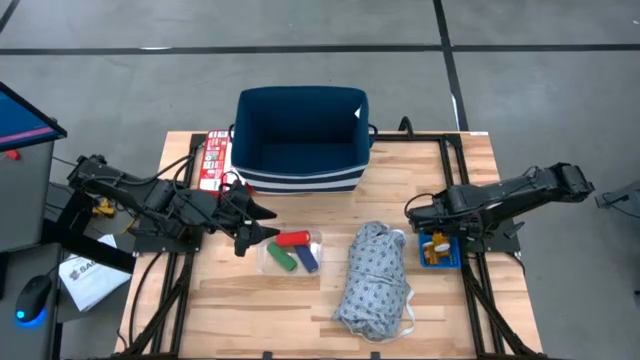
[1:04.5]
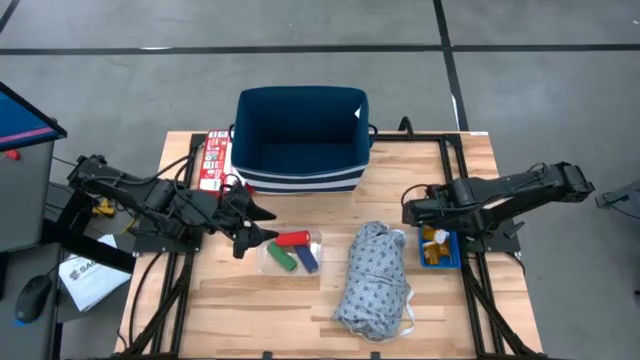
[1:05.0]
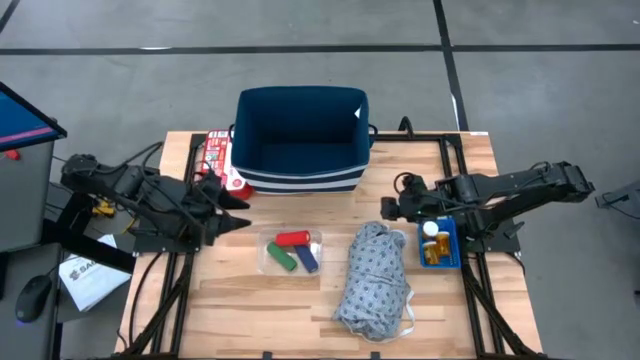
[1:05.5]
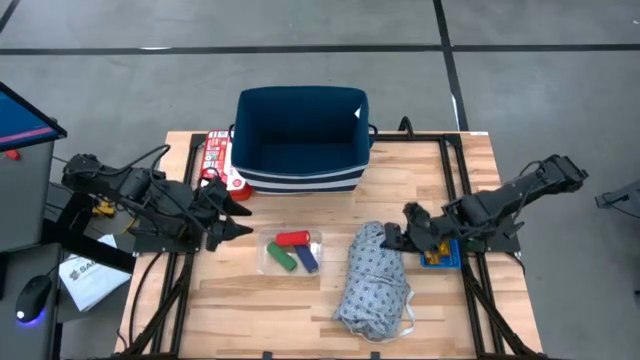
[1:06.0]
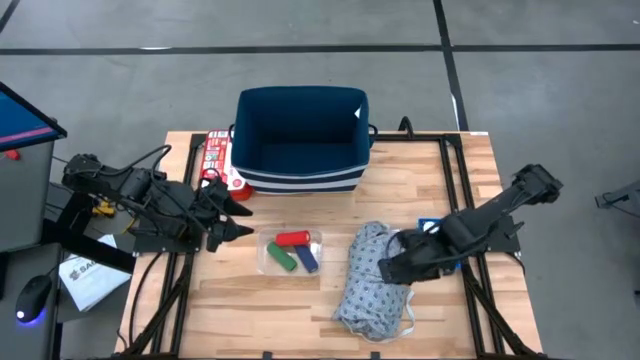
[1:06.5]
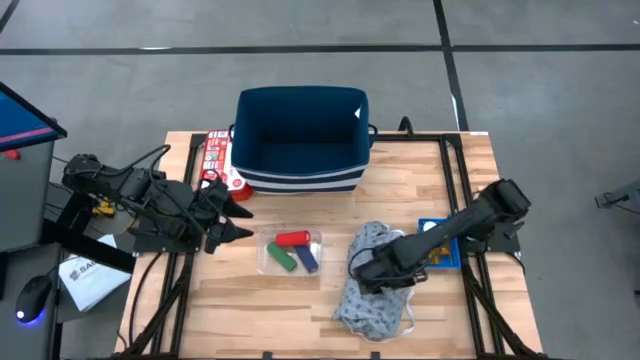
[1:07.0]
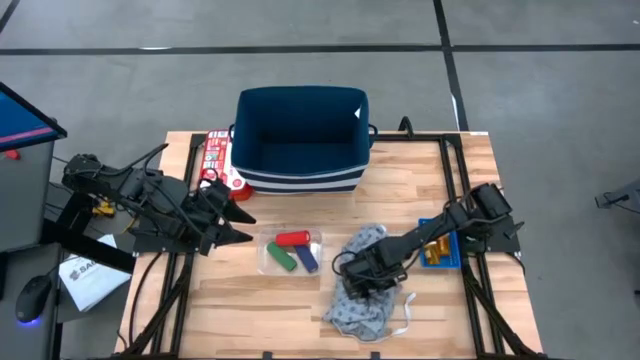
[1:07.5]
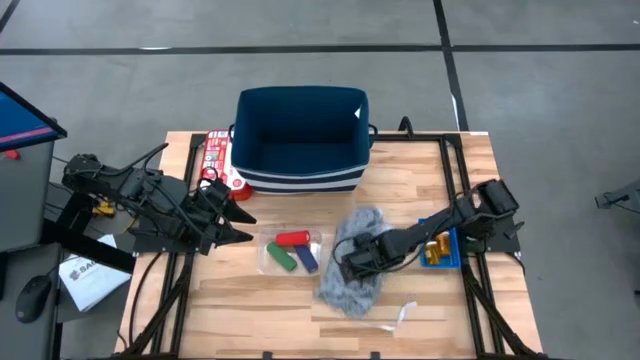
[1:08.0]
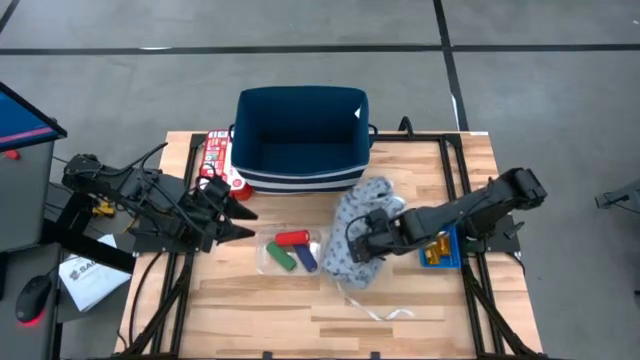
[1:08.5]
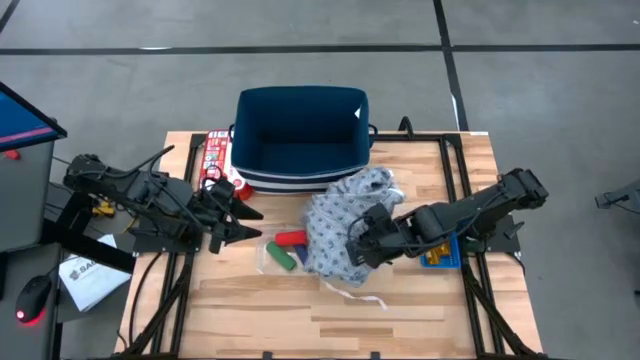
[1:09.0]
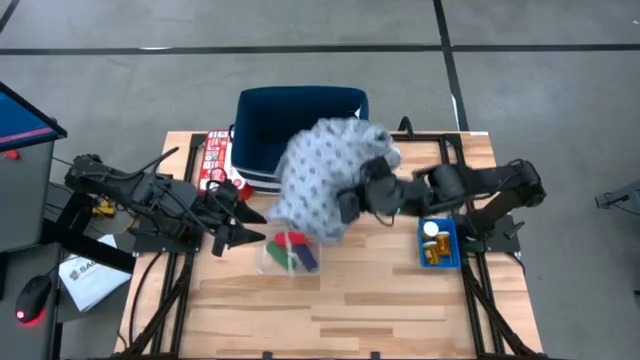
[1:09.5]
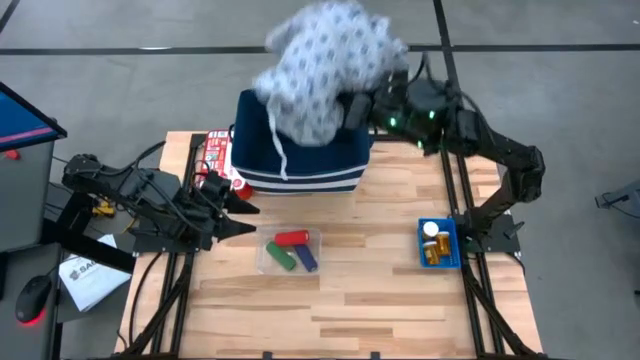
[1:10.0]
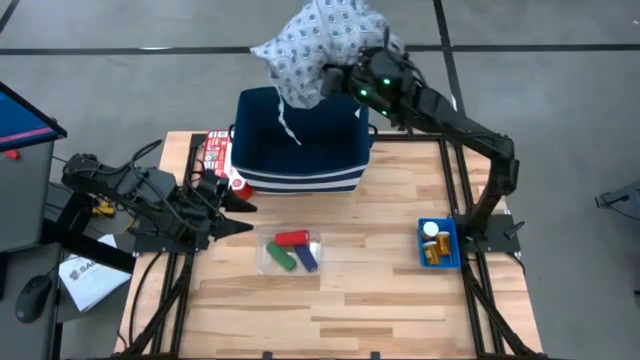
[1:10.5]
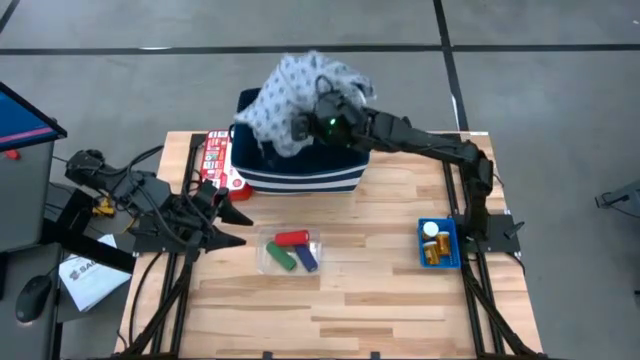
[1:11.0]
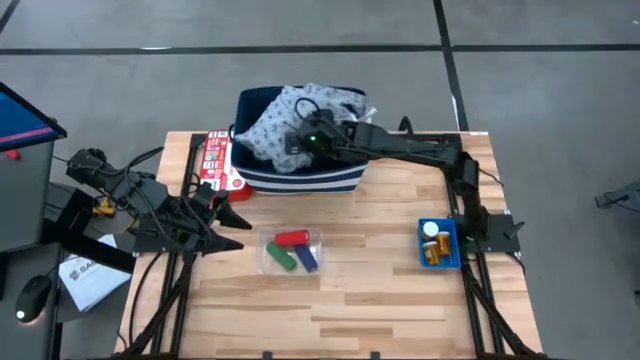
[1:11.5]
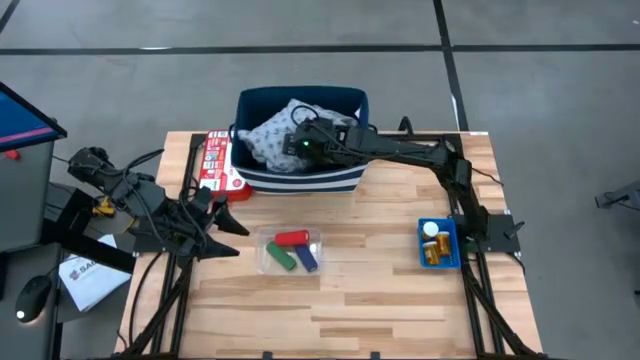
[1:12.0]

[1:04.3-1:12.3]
Task: Pick & place medical supplies in basket/bin
Put the blue patient gown into the large blue bin

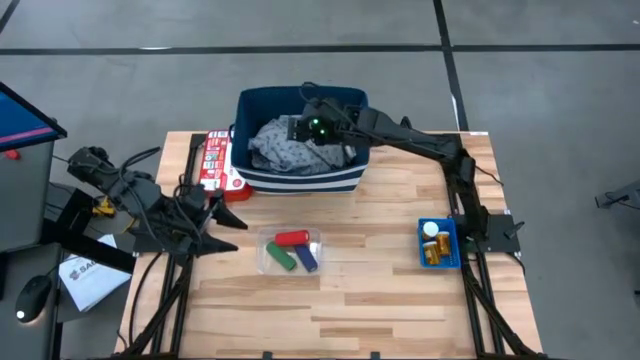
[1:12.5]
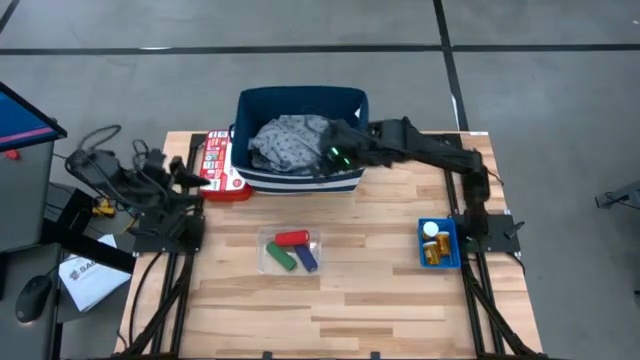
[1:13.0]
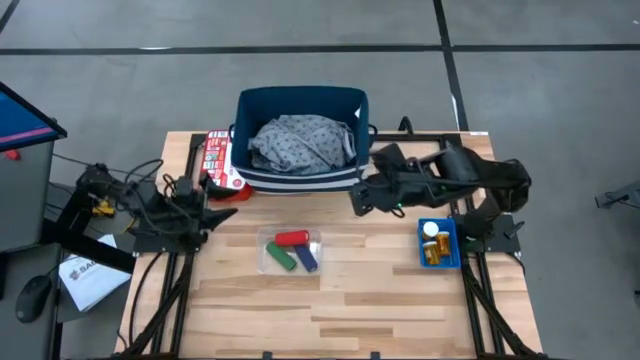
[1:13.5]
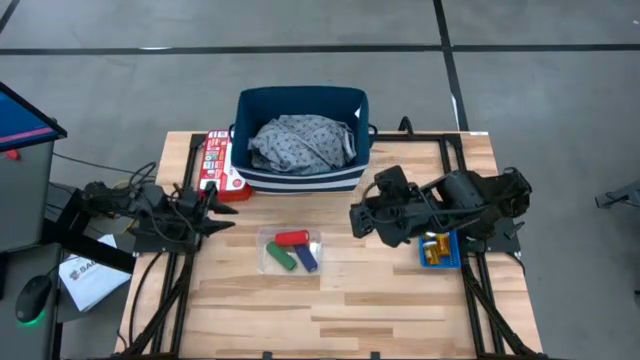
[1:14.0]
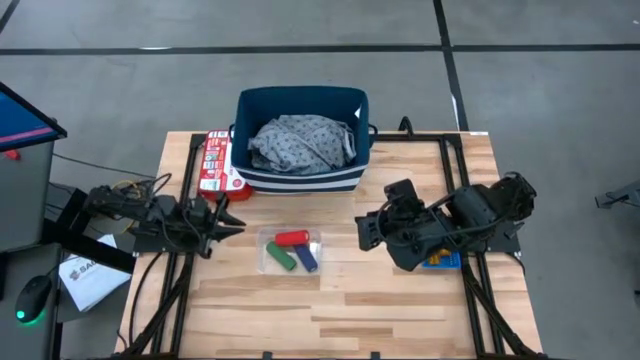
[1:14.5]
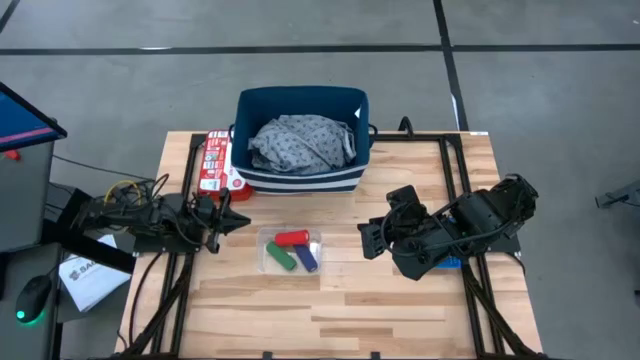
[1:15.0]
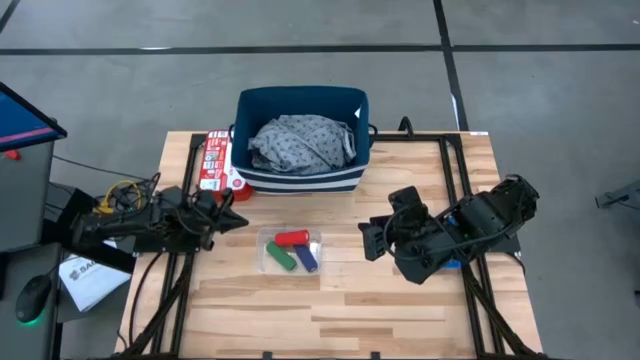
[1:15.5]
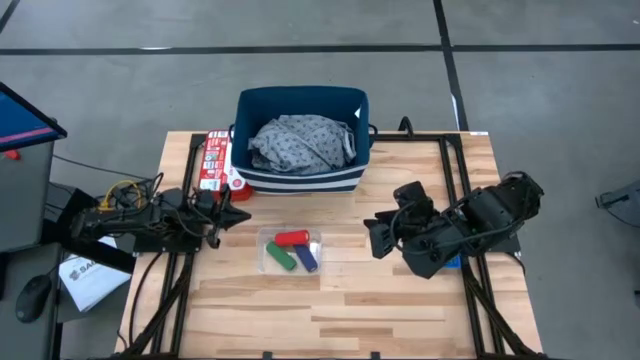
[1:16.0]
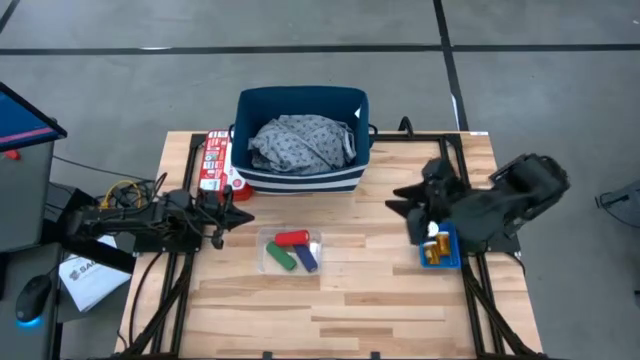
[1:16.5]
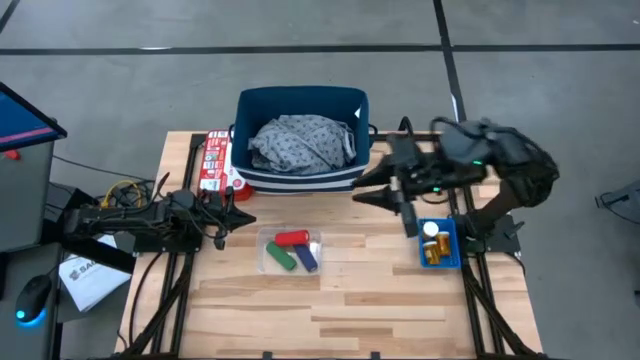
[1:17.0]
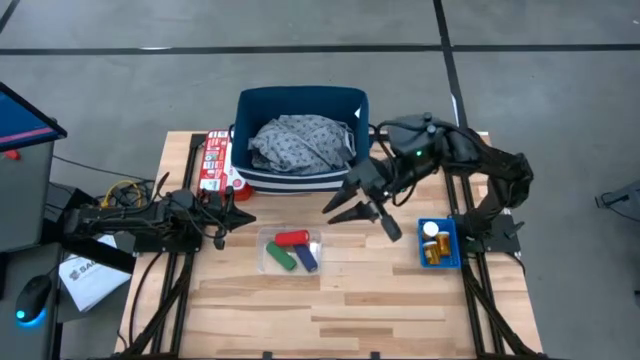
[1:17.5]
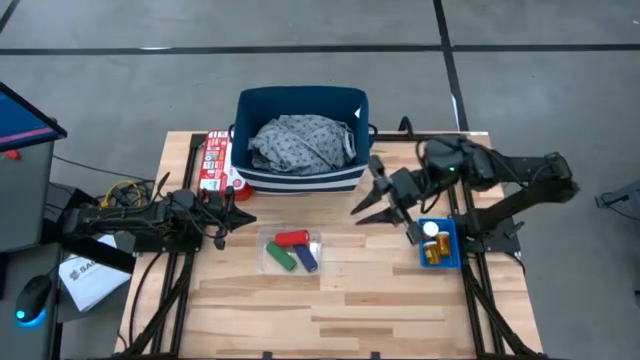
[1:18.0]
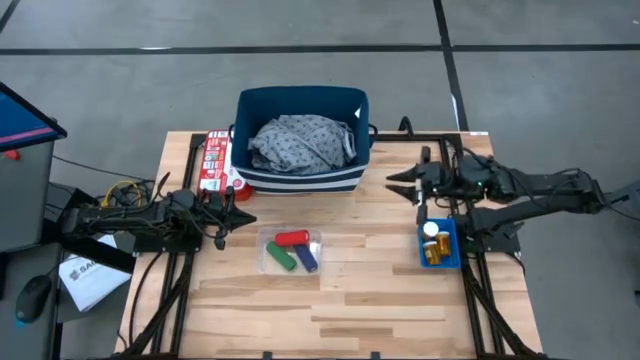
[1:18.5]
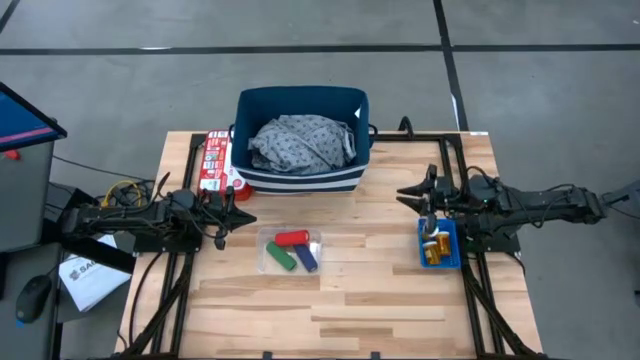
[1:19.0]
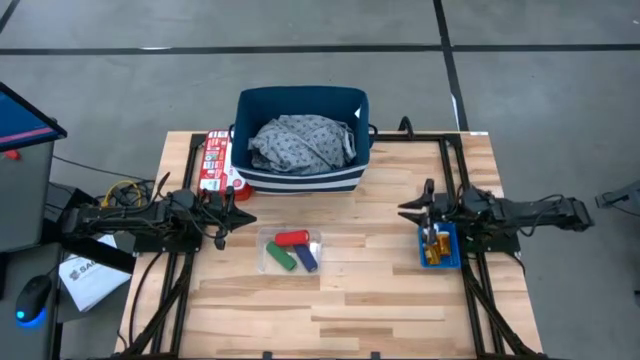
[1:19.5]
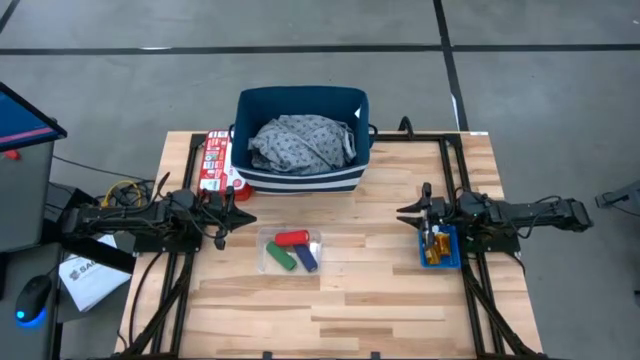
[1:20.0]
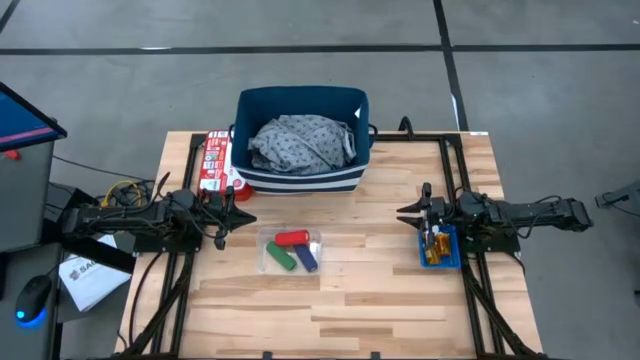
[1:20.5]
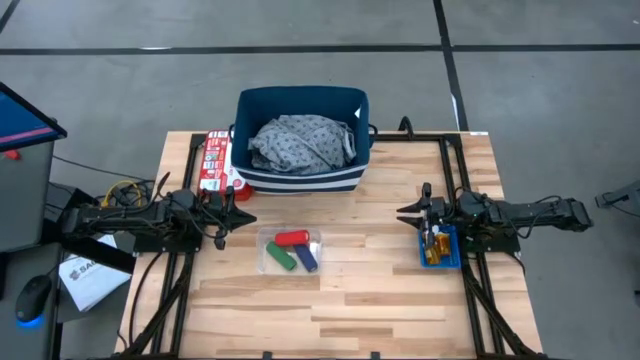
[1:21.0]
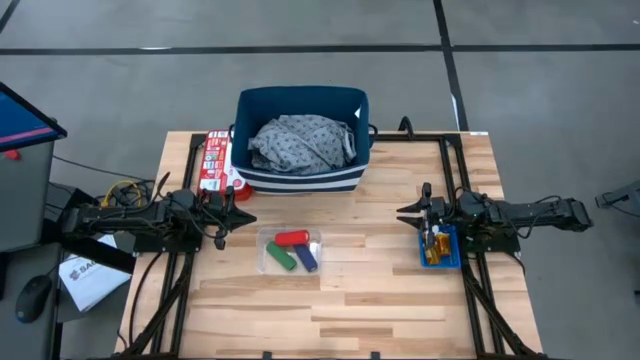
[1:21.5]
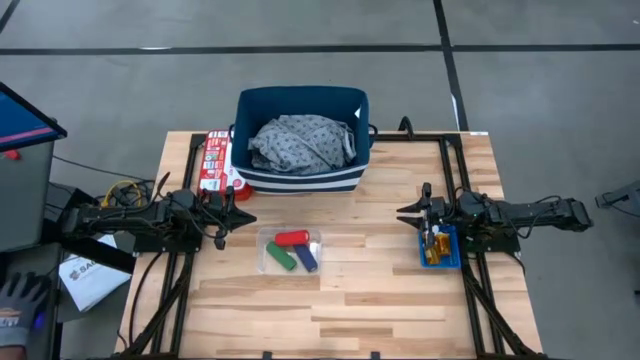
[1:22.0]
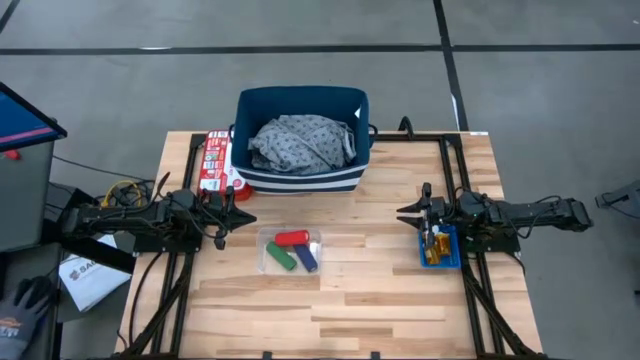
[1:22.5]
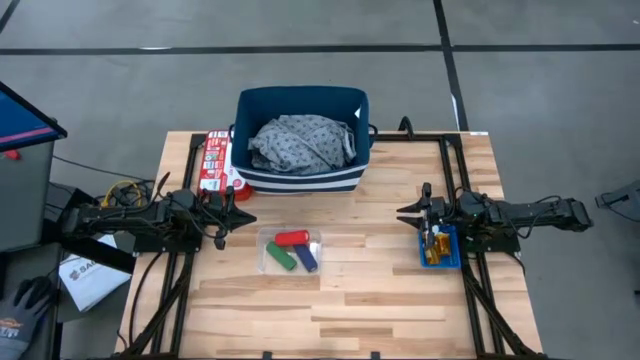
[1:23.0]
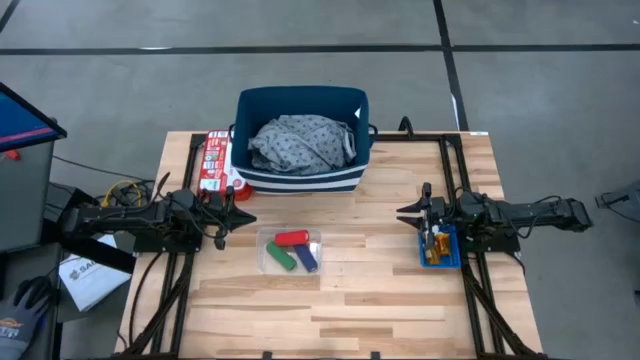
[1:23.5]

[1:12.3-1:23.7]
Return to Home Position

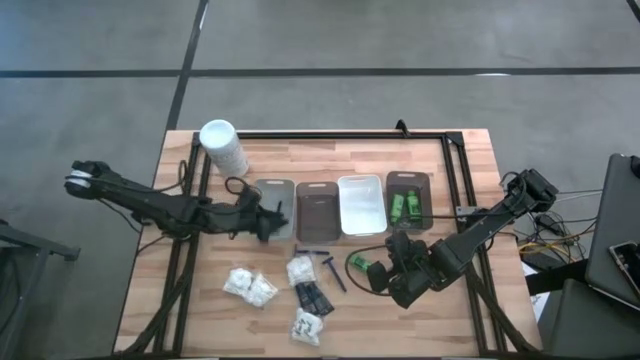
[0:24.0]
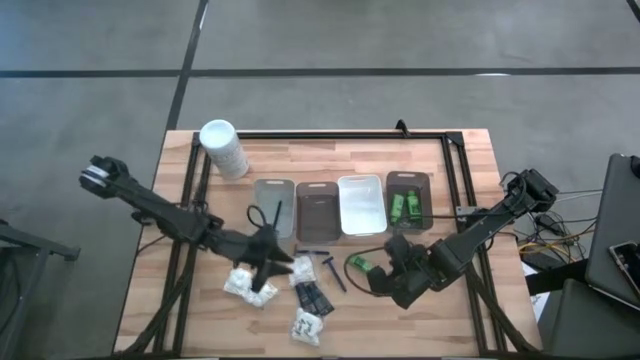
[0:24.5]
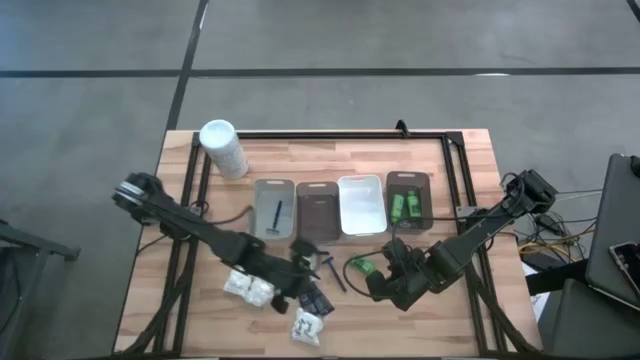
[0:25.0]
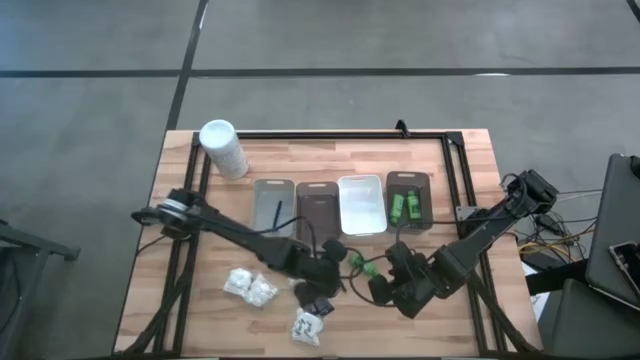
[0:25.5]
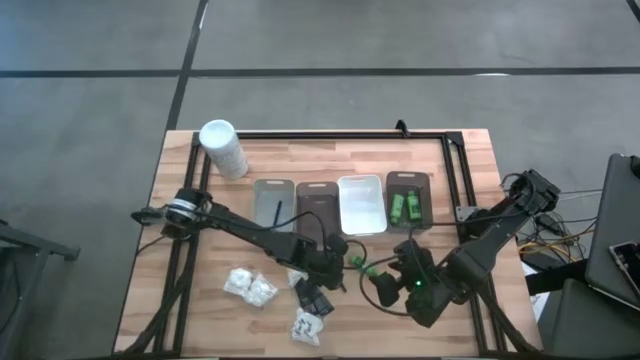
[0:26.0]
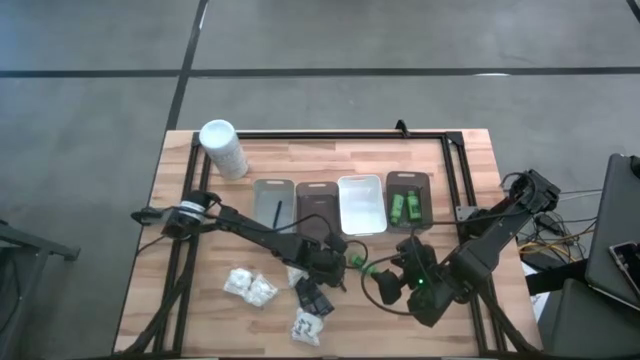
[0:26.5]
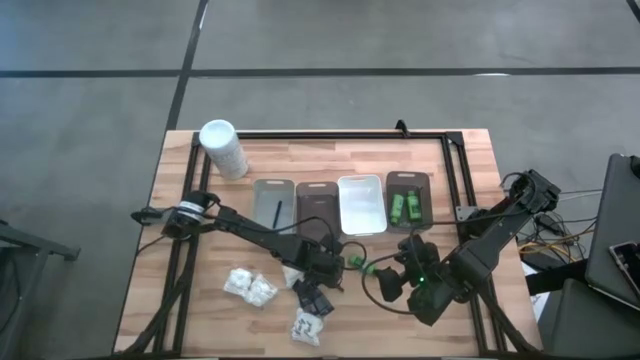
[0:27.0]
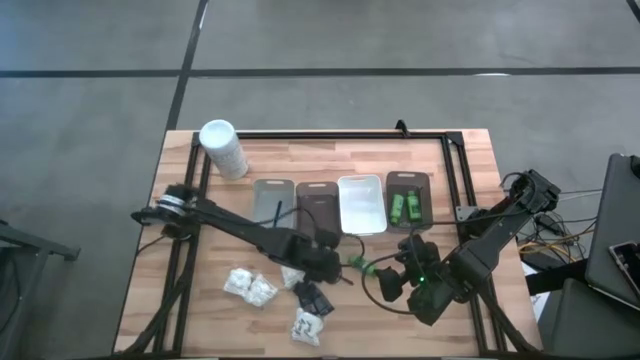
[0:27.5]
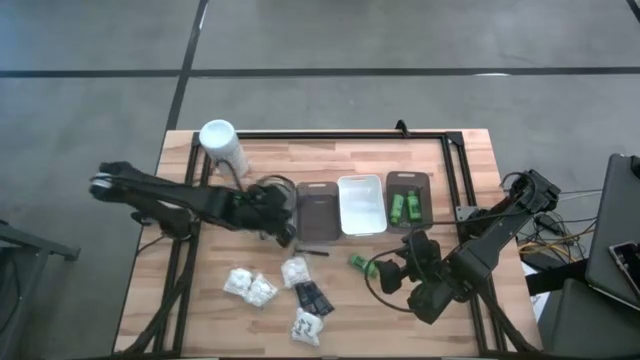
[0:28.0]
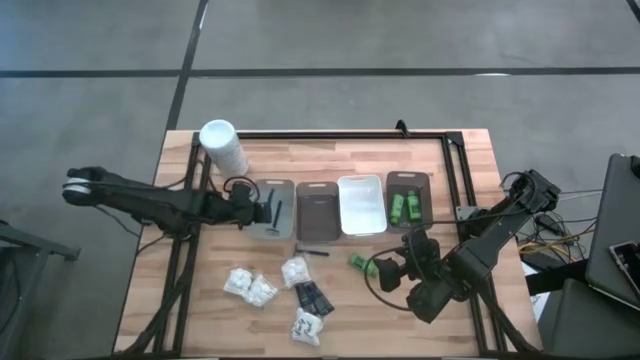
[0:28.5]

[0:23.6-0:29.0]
Task: Pick & Place Travel size toiletries
Put the blue razor into the gray bin
